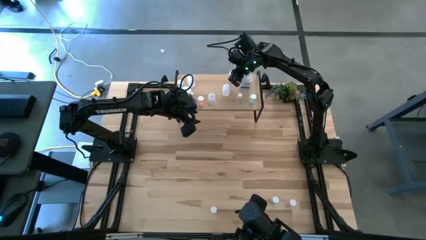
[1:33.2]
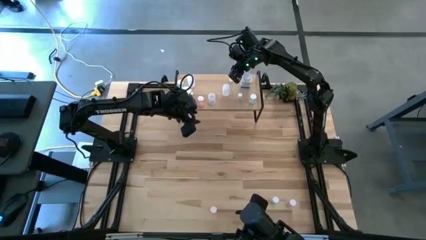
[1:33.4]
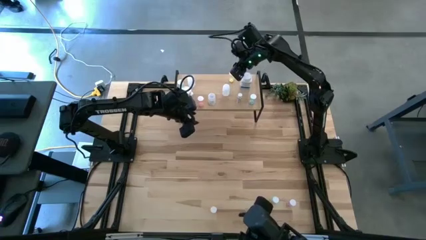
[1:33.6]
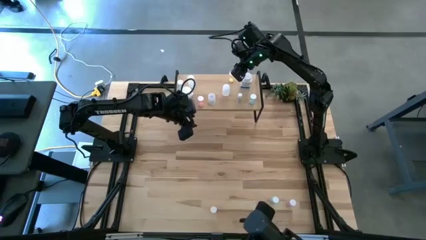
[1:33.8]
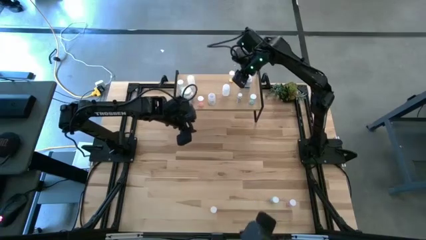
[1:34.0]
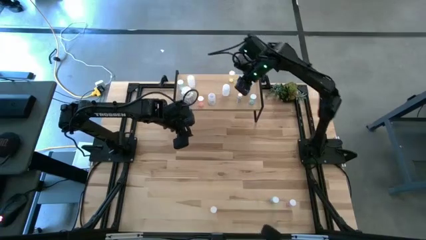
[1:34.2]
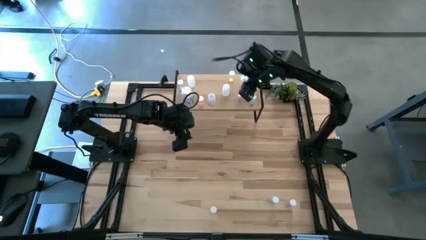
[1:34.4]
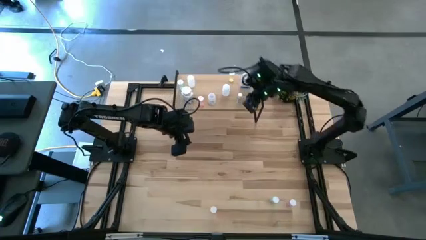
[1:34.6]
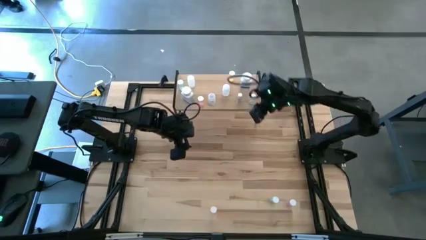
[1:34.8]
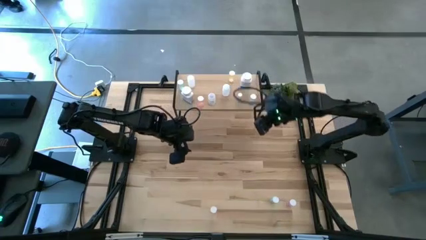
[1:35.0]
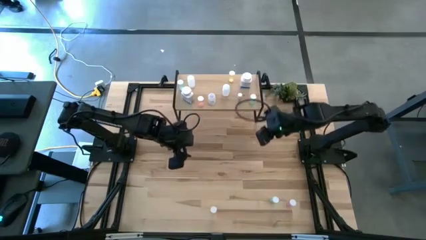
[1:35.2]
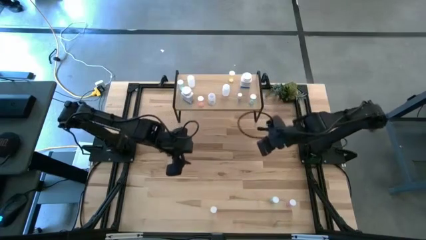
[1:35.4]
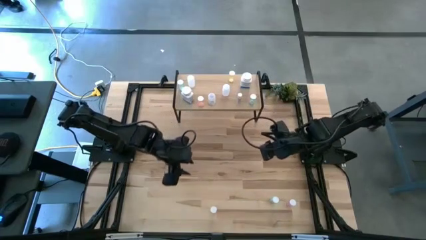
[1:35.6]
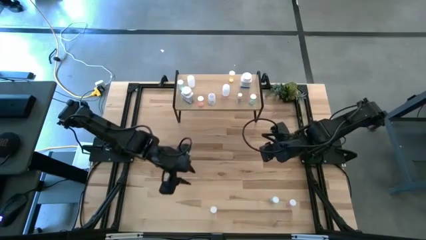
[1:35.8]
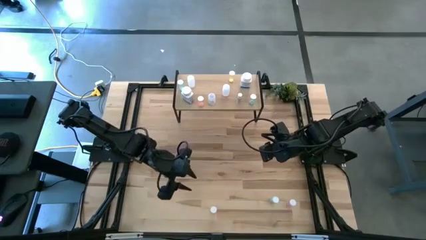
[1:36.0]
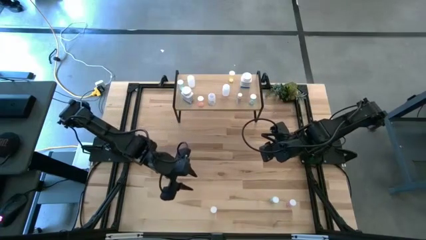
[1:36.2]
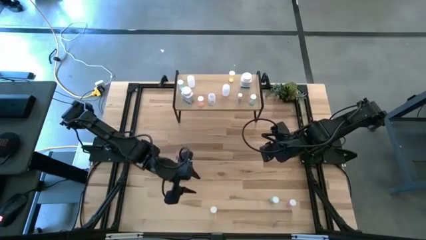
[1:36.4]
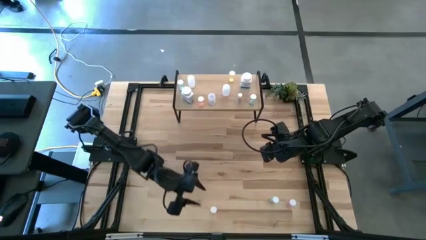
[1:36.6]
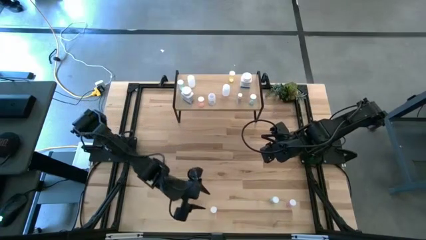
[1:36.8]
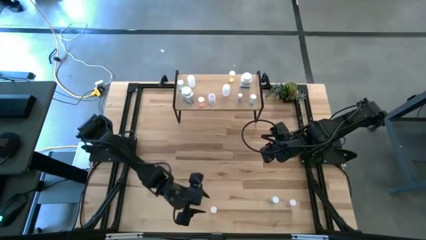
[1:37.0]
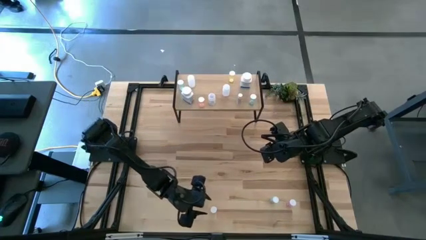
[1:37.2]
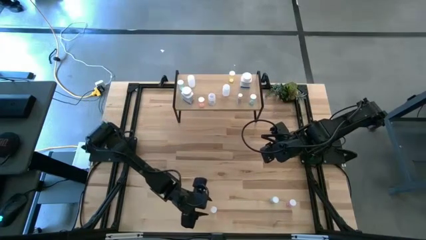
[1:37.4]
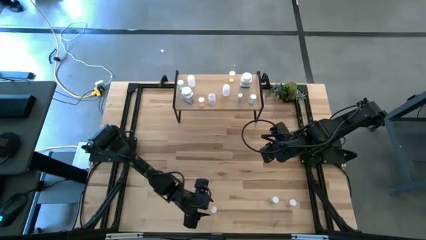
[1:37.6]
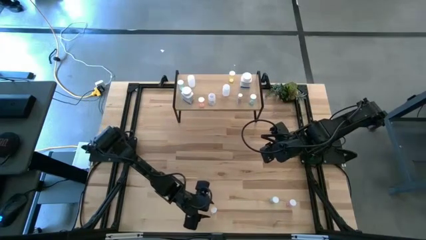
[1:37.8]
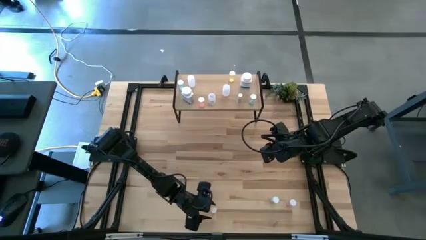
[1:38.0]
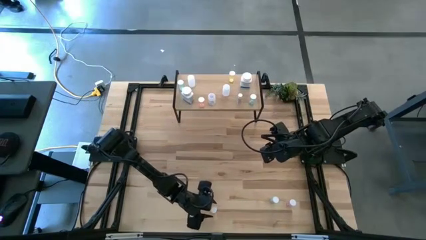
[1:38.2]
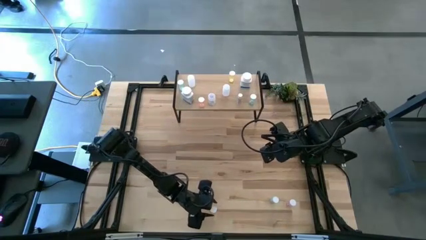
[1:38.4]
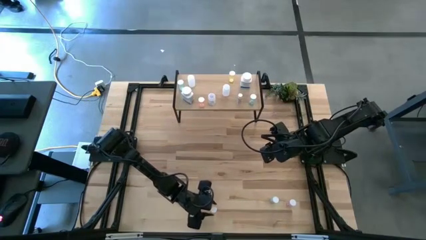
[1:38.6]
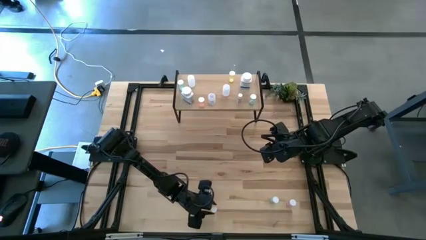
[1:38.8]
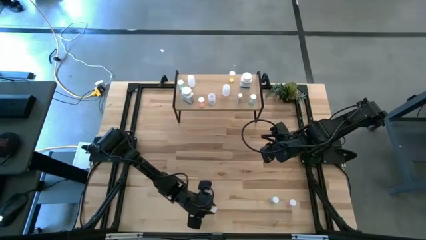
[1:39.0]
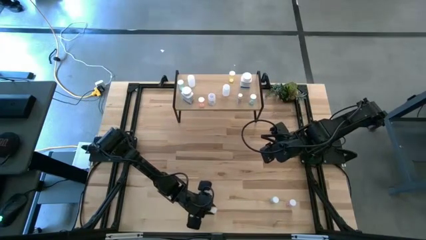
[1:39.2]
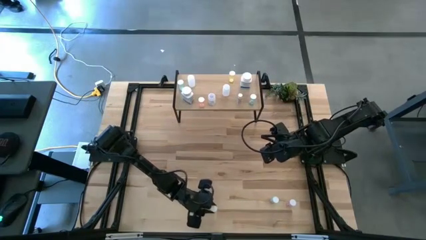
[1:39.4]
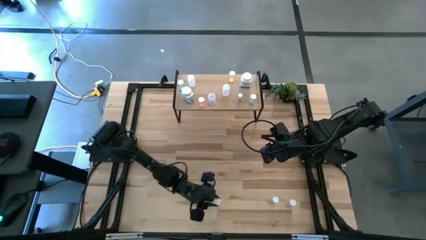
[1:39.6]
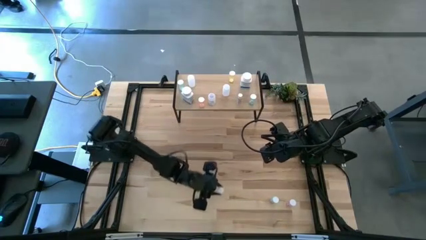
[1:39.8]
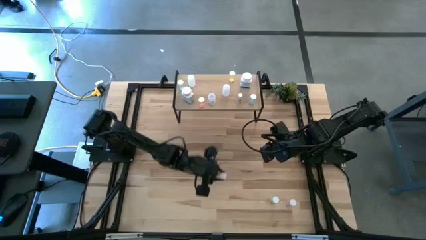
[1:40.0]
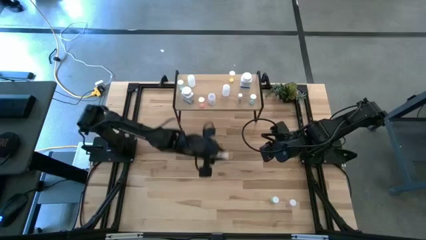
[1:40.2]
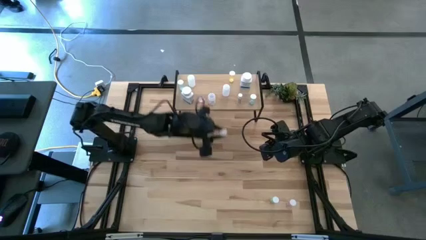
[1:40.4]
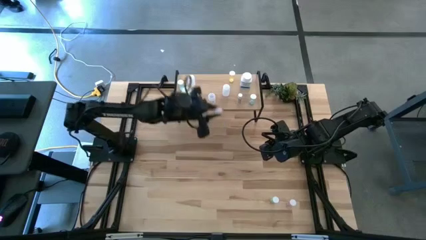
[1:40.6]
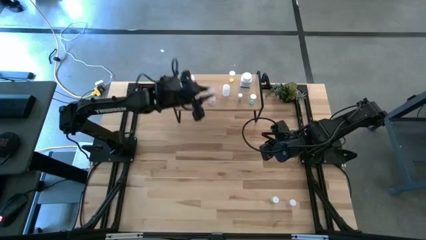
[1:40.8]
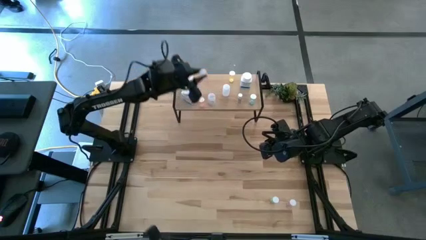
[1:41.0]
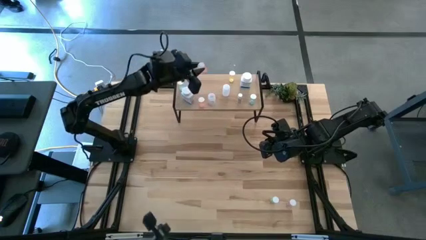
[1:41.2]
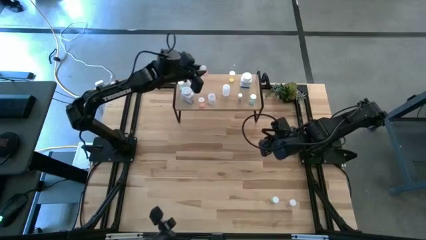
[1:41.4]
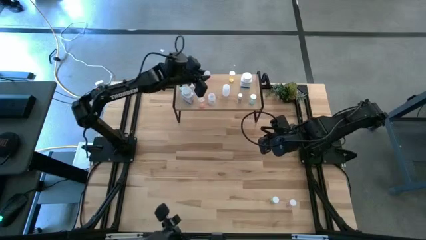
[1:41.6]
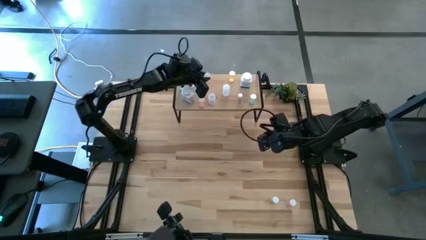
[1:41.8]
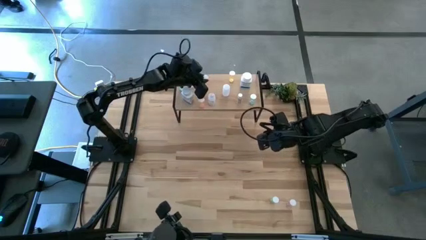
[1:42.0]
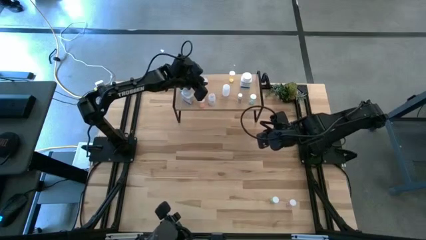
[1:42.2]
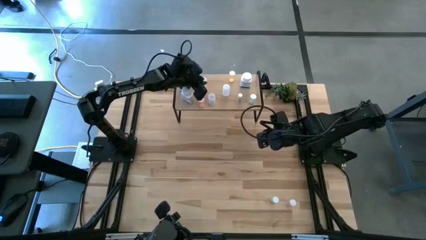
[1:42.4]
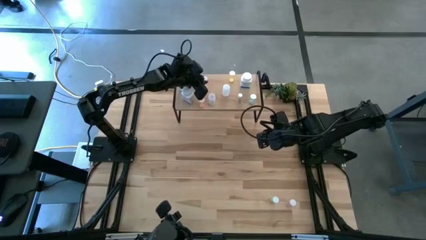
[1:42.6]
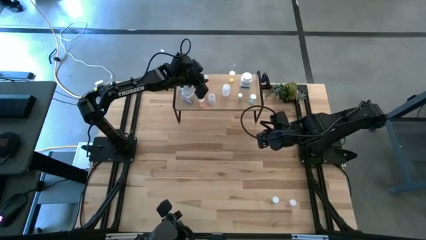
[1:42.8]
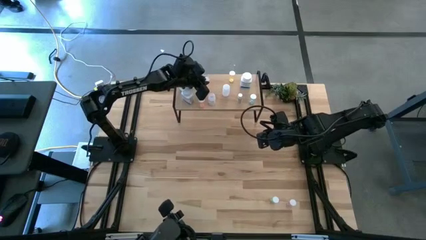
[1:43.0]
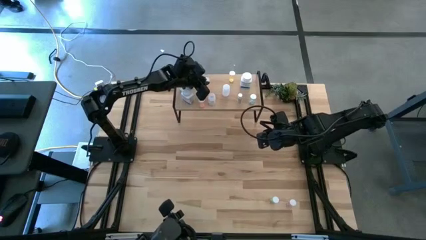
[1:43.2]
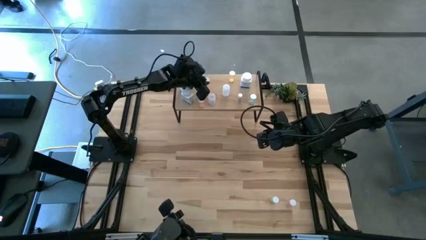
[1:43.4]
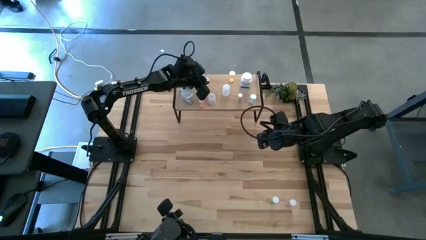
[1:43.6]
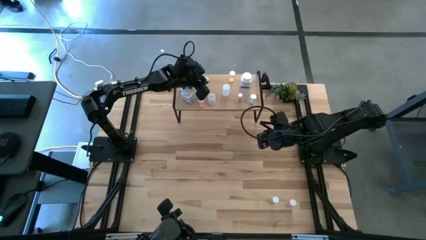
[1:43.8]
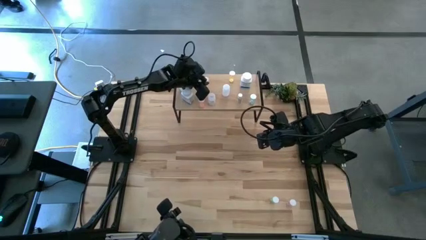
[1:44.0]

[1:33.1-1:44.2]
Task: Pick and place medicine bottles onto shelf by color
Put the left red transparent pill bottle on the shelf

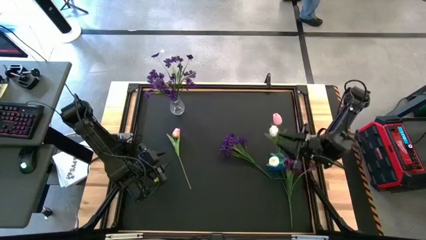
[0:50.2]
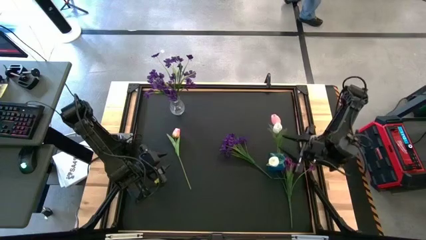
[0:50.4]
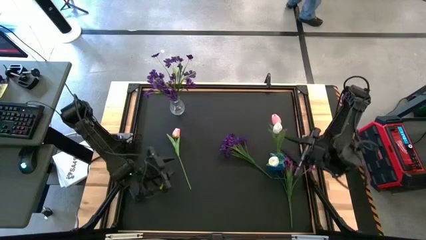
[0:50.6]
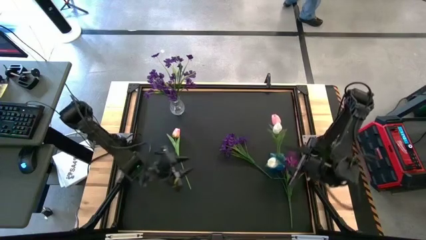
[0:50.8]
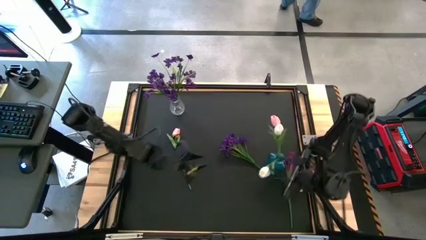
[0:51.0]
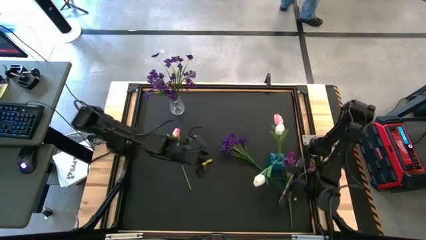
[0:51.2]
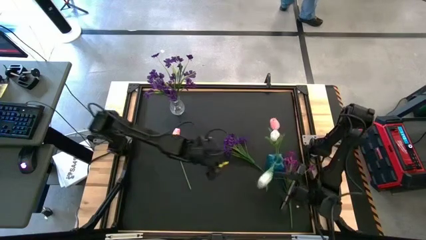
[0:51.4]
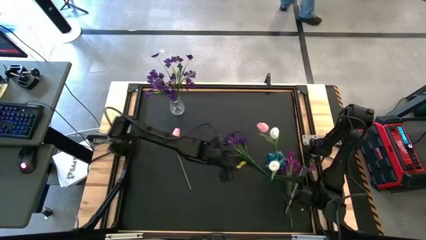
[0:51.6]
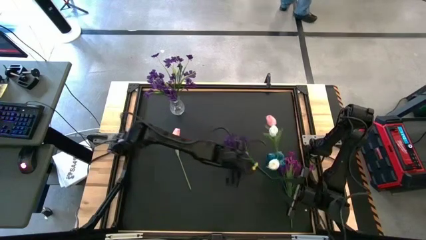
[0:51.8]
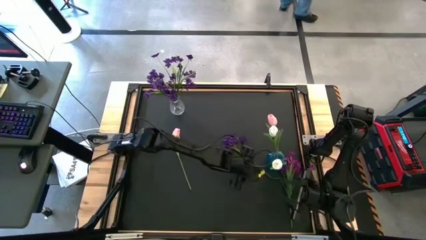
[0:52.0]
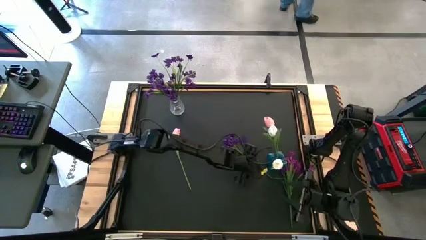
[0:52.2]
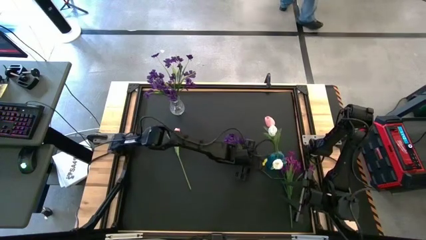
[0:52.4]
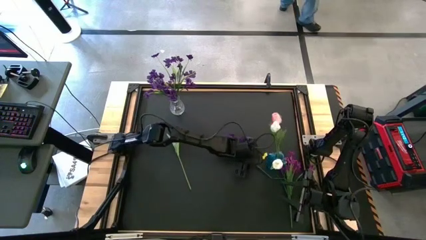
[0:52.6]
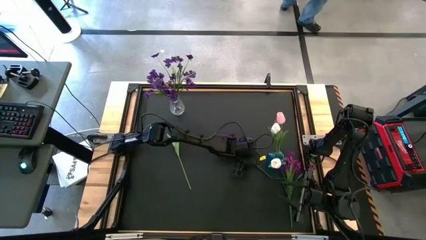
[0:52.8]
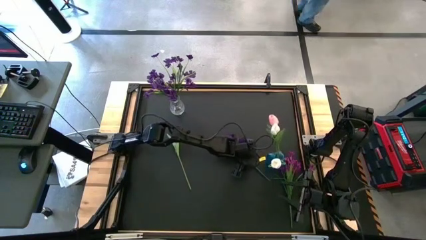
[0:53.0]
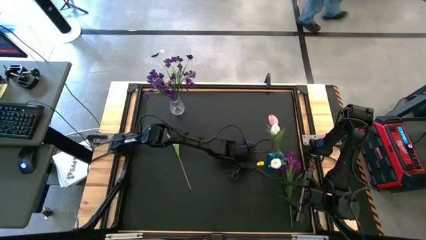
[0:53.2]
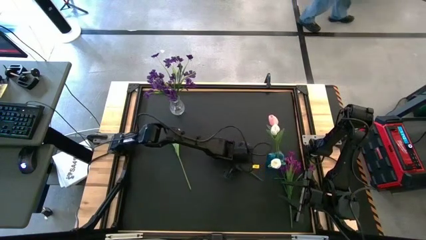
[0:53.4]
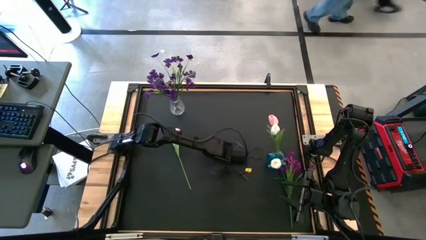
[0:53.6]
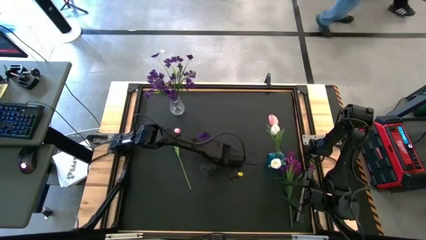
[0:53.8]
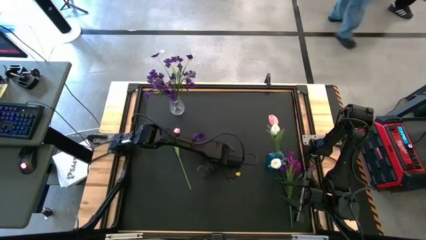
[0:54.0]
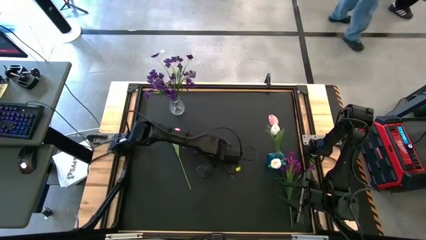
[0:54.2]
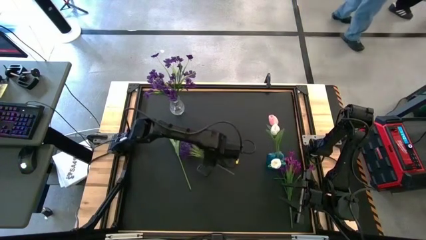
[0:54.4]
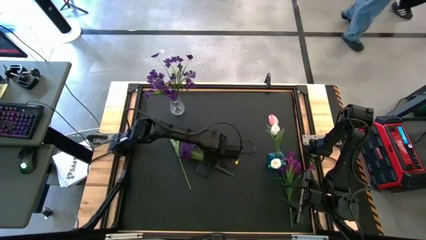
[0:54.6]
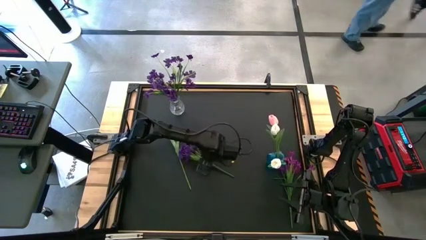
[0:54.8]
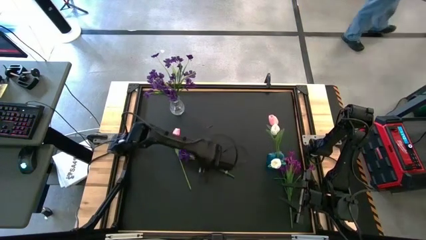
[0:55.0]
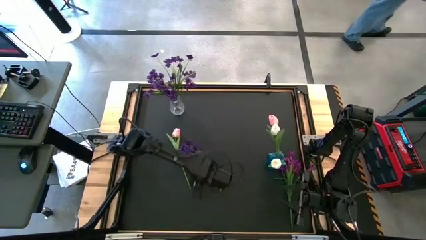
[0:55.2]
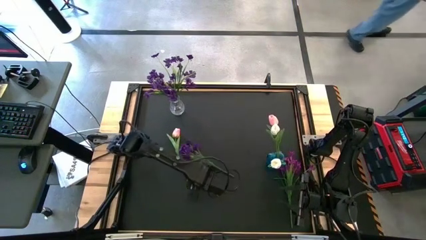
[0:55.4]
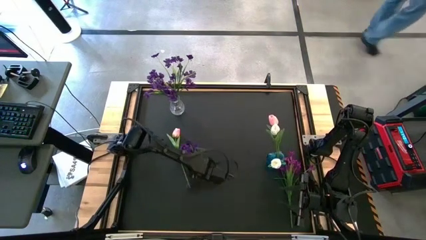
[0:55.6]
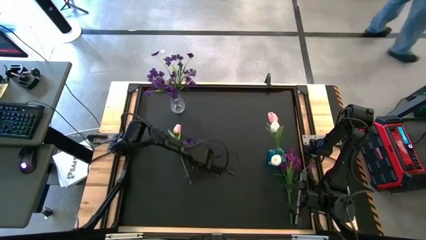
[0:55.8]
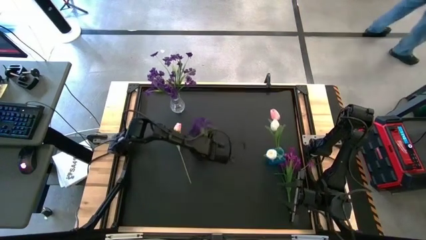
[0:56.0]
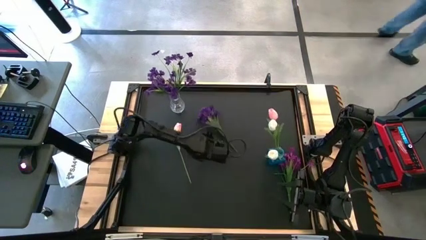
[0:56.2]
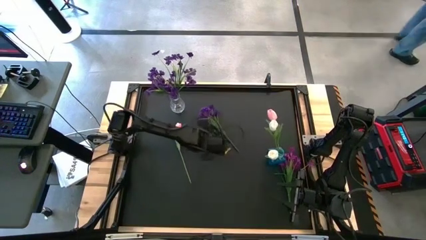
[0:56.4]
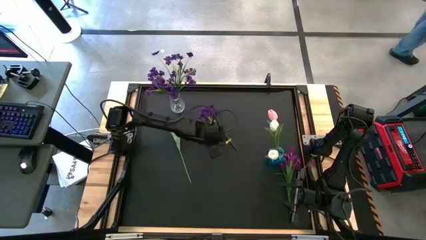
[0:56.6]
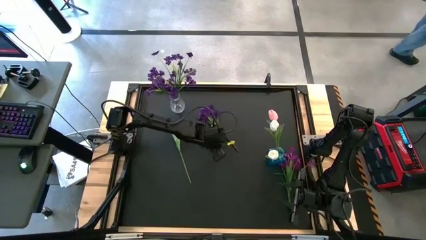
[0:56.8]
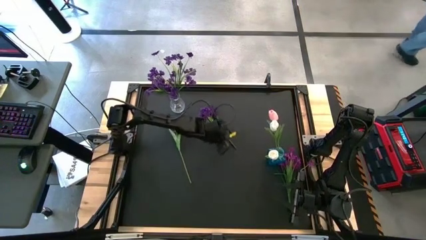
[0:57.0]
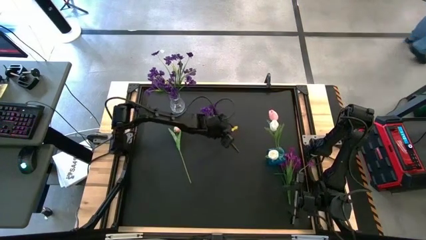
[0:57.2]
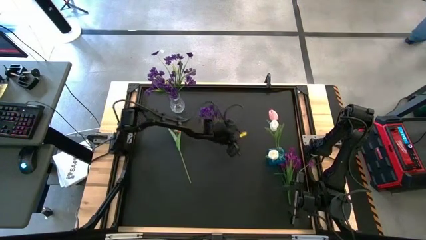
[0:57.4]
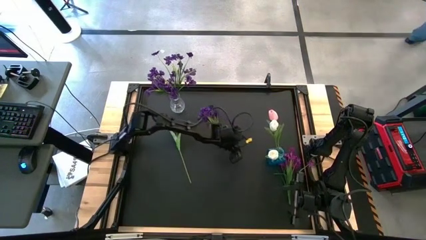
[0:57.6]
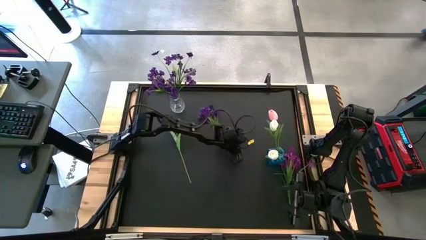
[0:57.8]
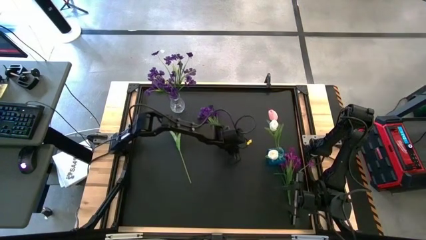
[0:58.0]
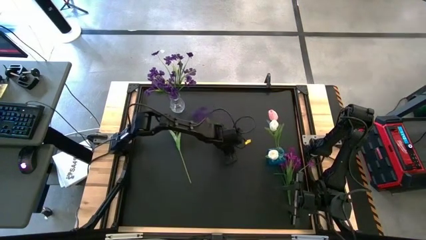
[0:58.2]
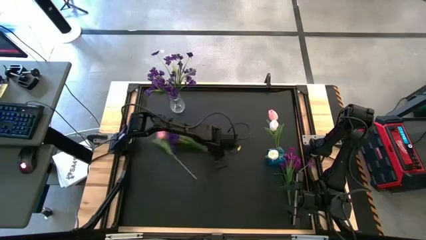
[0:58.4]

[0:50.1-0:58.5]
Task: Sort flowers into vase by color
Put the violet flowers into the transparent white vase
